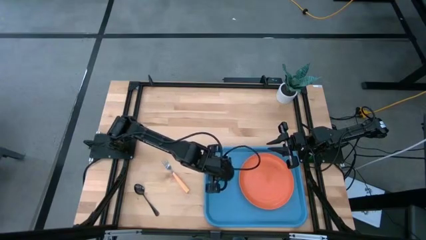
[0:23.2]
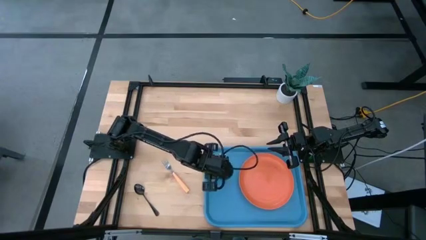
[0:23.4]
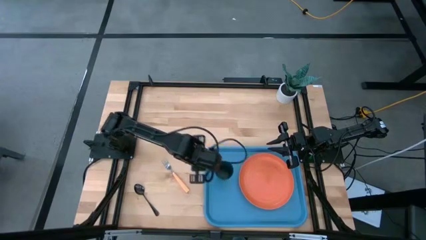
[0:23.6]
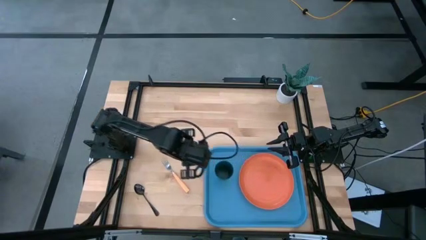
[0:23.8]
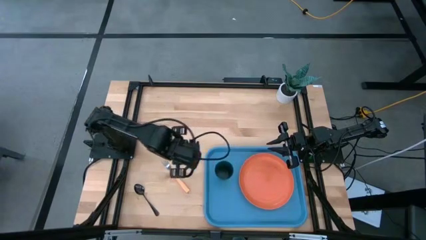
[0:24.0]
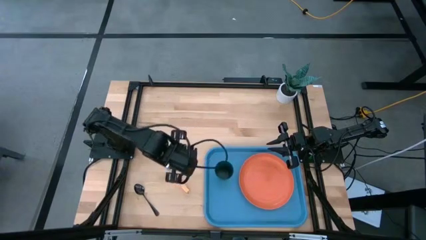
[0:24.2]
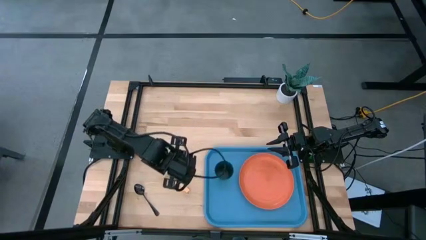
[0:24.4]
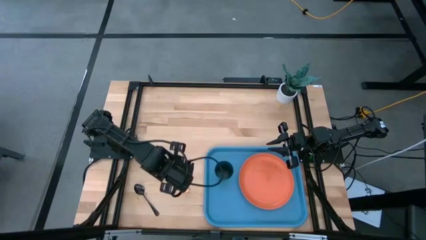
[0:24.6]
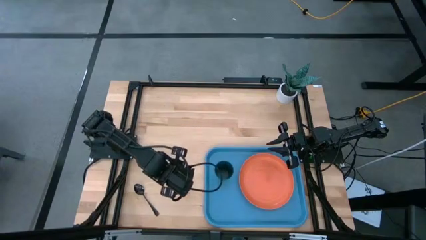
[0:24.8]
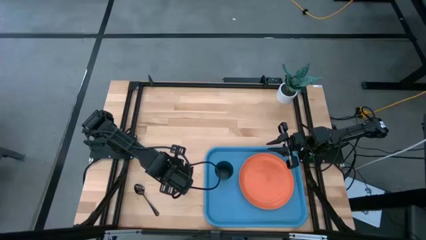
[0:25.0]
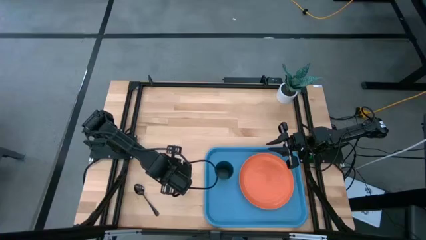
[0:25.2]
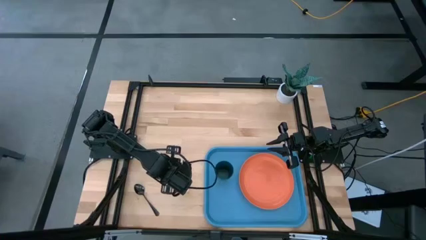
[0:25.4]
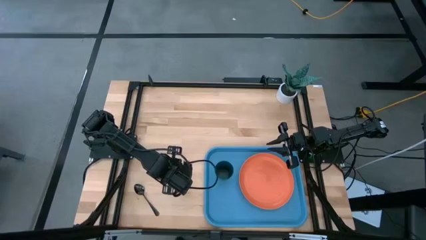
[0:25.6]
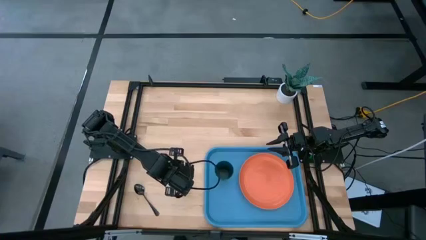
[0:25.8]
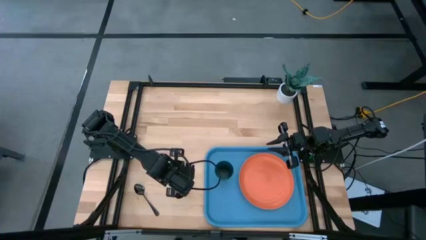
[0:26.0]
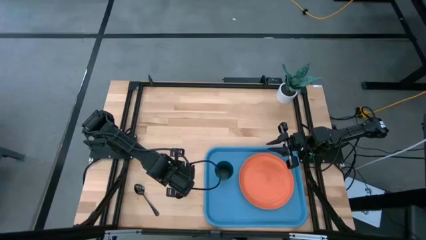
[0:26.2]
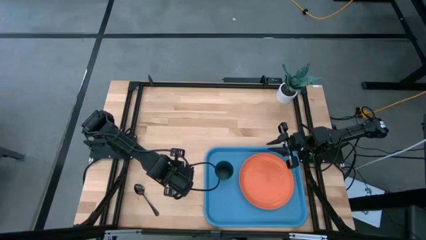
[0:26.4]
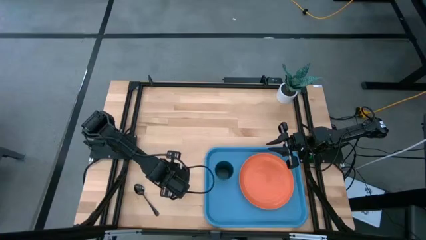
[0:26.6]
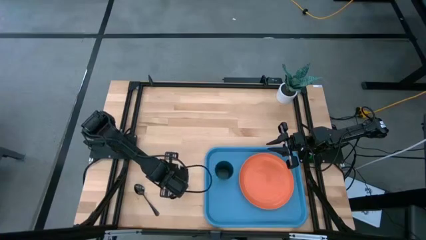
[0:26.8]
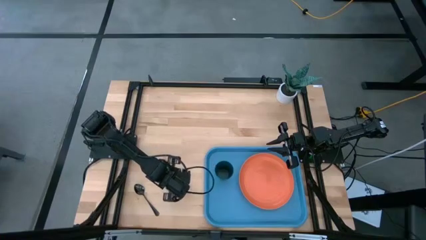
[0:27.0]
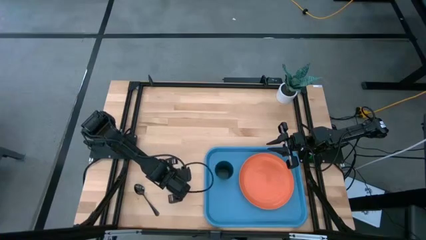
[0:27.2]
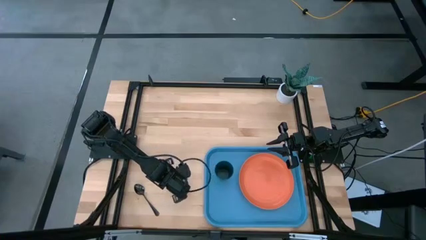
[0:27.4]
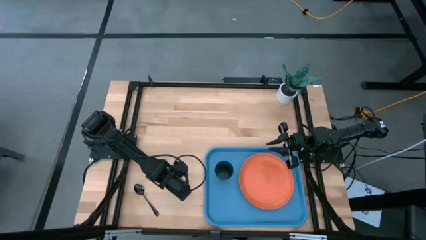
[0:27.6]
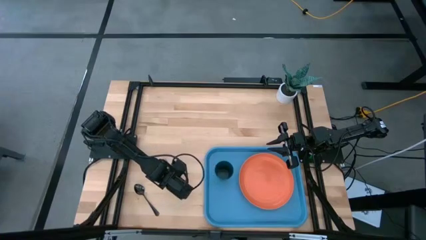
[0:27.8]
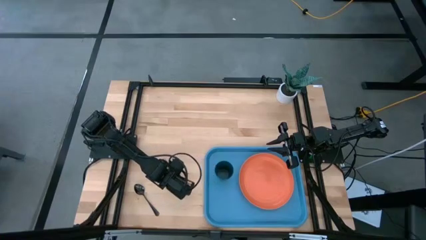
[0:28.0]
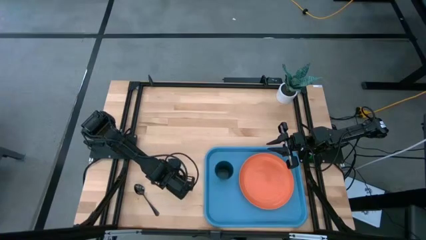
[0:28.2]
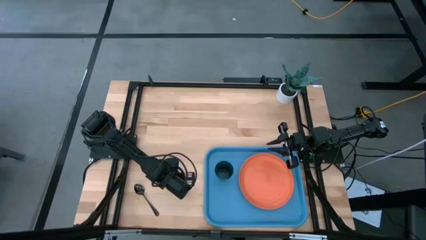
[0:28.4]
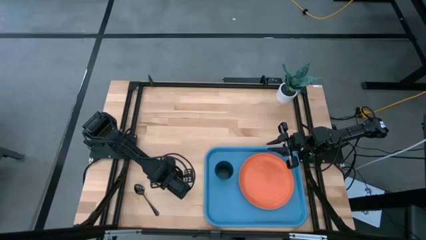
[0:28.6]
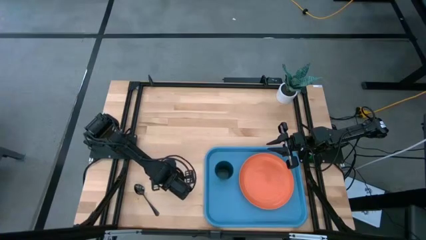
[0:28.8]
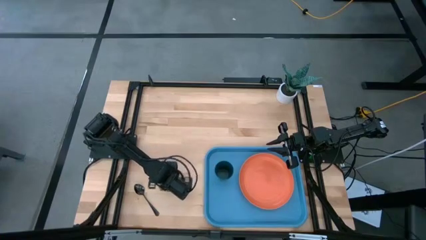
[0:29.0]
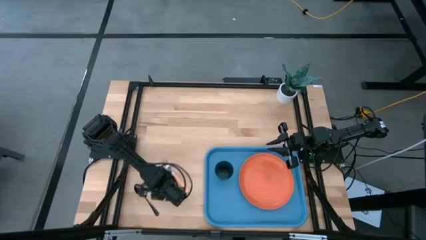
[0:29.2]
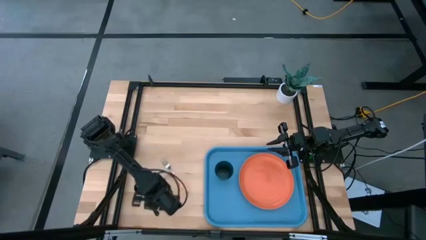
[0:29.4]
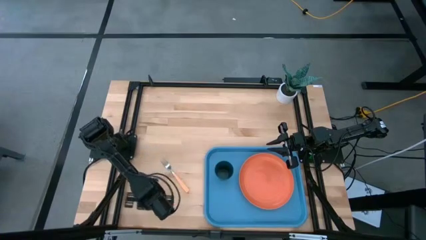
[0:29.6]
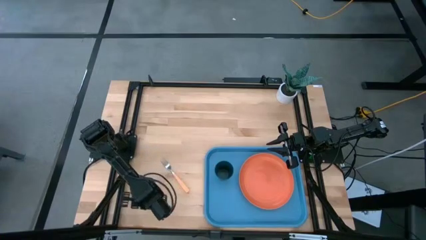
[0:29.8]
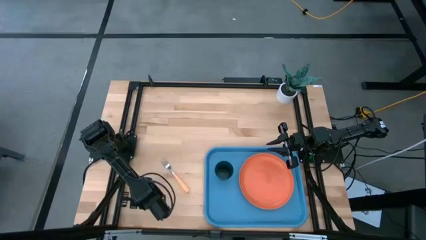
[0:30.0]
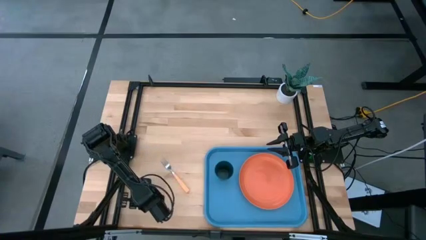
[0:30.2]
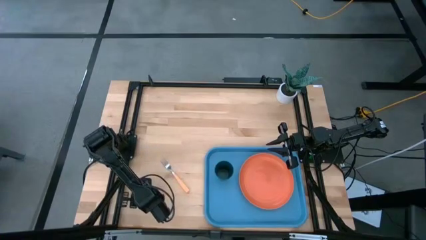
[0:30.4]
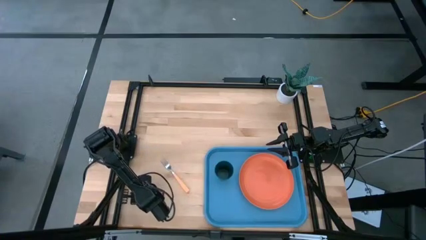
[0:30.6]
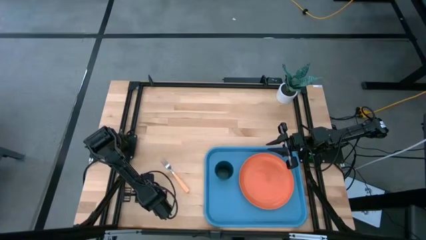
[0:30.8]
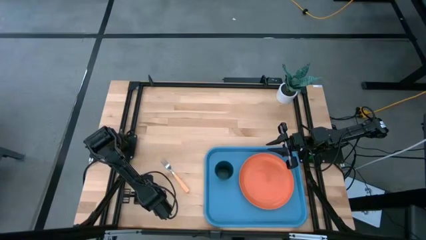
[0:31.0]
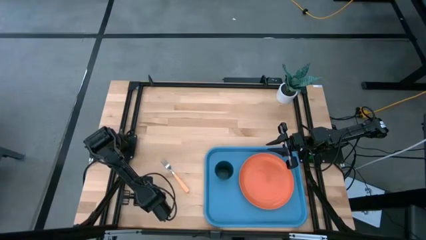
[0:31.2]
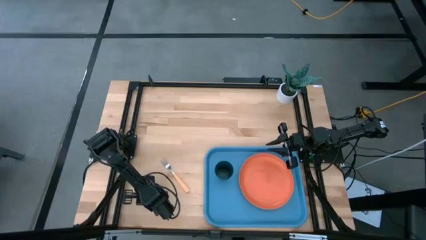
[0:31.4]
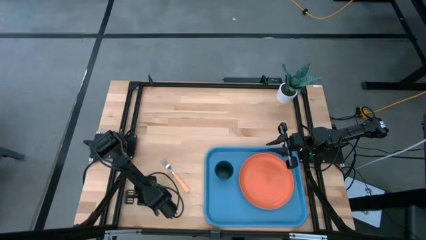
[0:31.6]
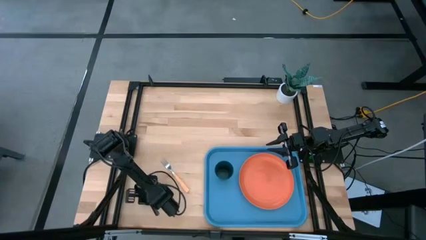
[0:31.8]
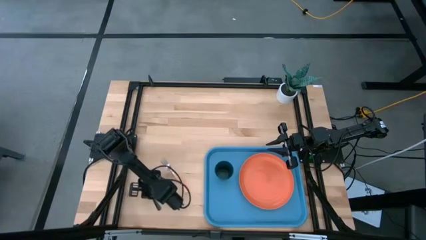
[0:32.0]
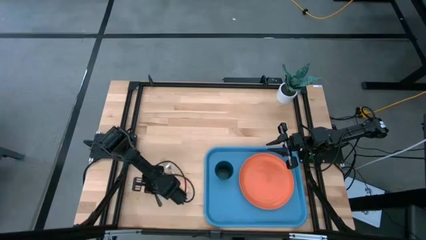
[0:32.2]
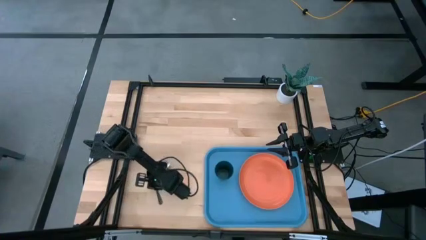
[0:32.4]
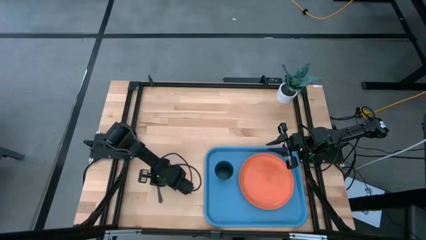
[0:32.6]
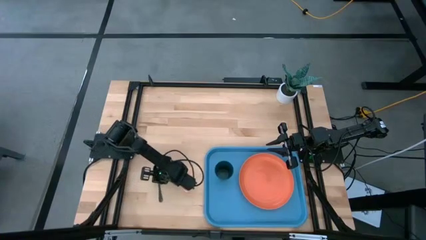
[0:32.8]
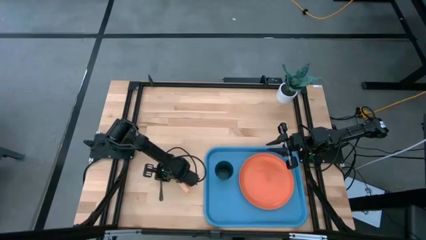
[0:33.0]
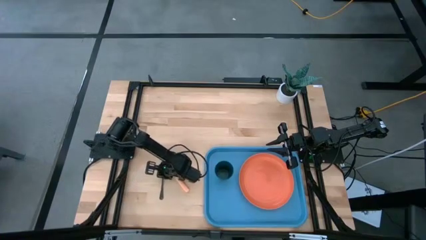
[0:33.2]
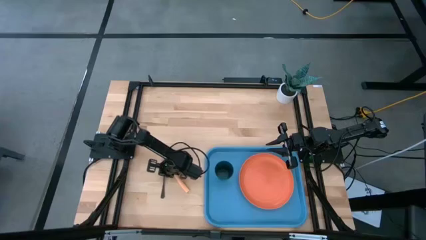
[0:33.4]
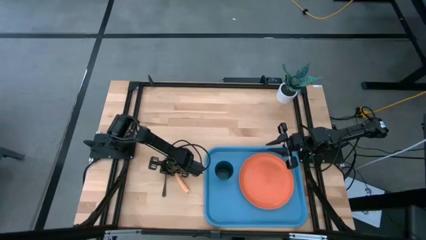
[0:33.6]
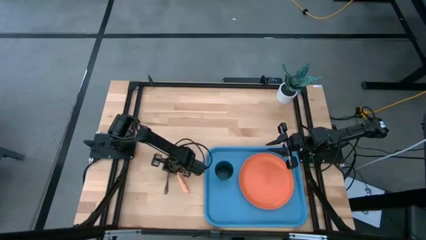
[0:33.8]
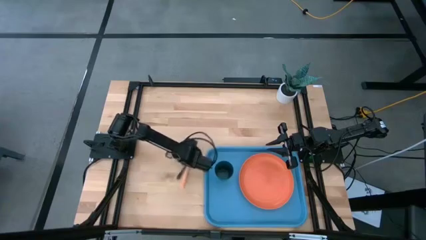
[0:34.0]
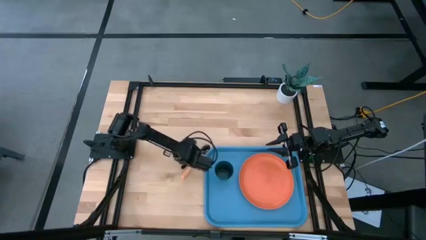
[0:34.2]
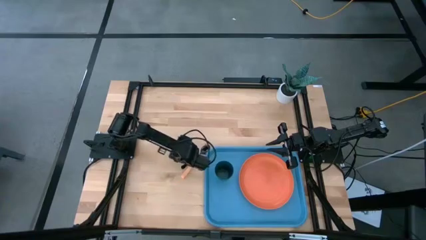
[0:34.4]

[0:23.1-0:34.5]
Task: Pick and place plate/cup/fork/spoon on tray
Adjust the black spoon

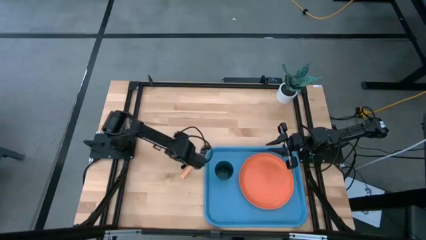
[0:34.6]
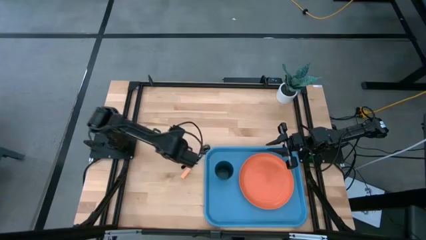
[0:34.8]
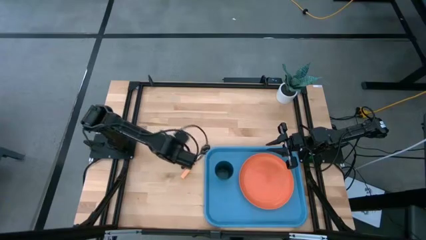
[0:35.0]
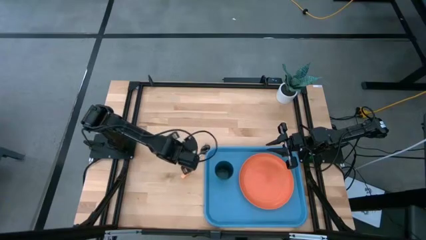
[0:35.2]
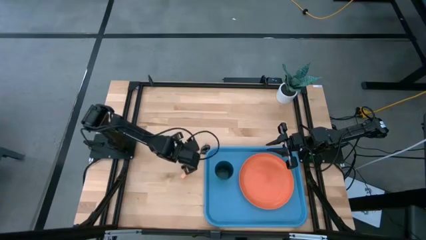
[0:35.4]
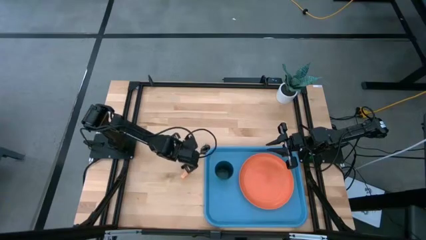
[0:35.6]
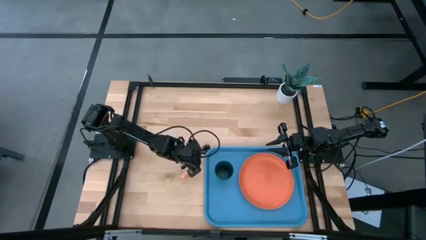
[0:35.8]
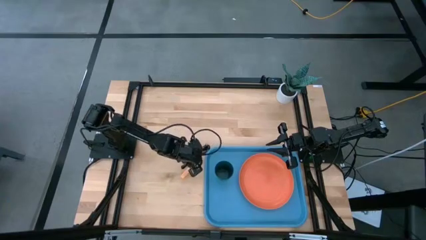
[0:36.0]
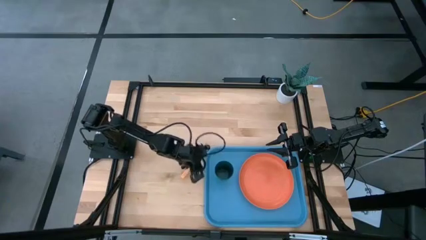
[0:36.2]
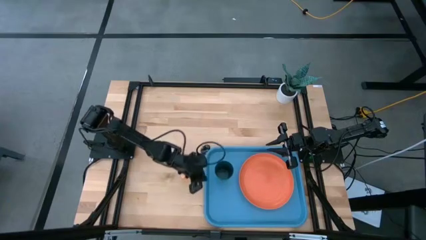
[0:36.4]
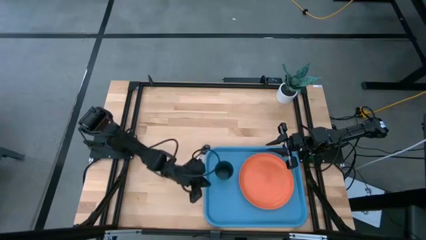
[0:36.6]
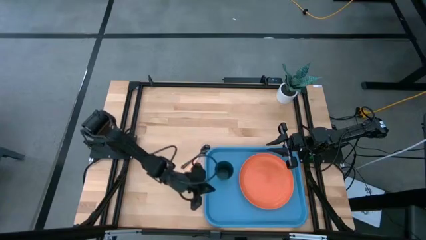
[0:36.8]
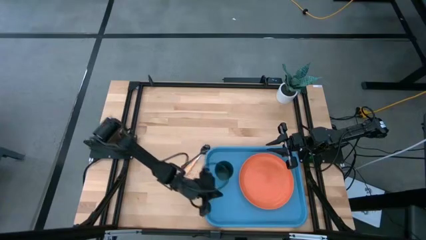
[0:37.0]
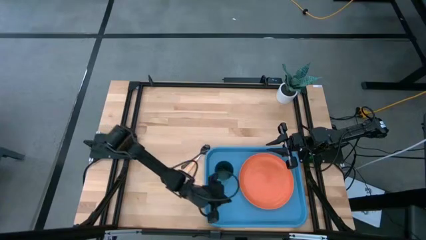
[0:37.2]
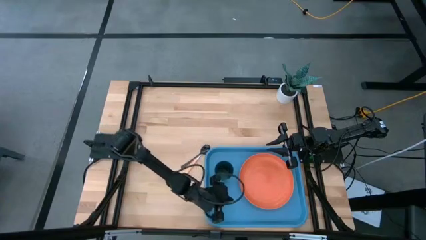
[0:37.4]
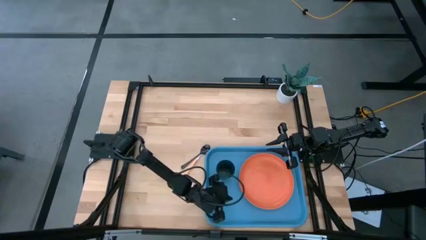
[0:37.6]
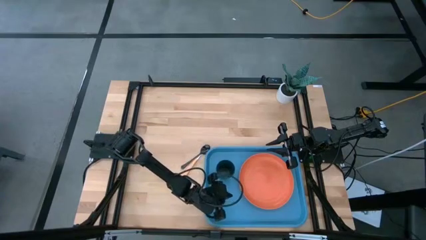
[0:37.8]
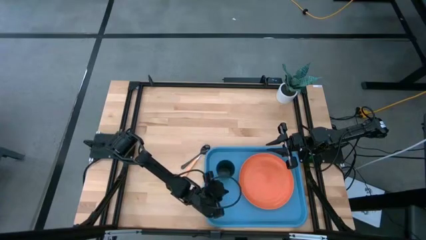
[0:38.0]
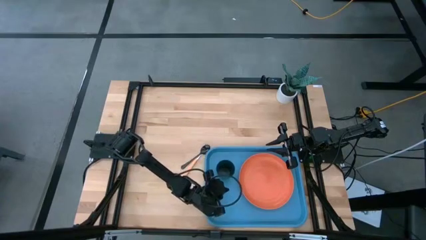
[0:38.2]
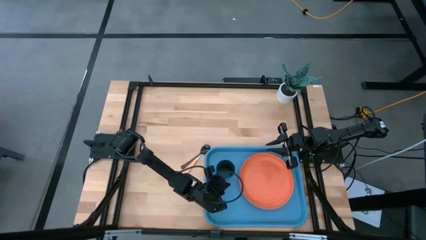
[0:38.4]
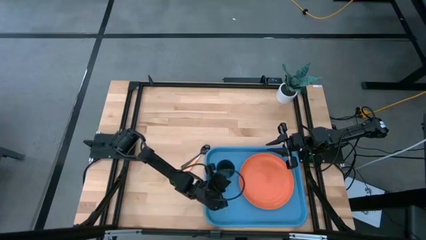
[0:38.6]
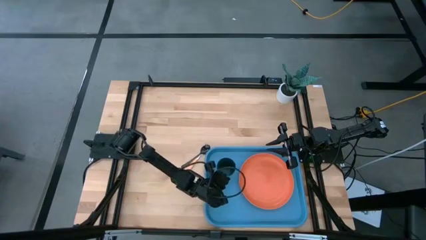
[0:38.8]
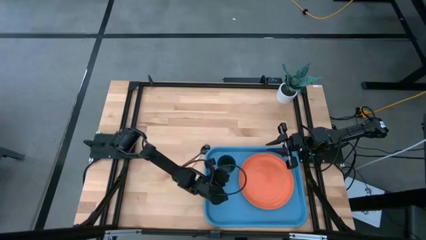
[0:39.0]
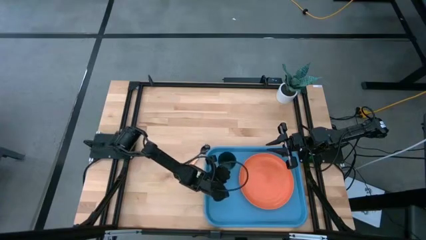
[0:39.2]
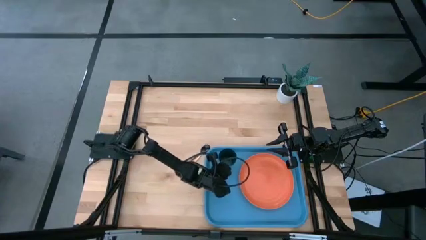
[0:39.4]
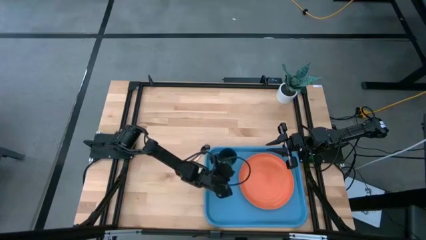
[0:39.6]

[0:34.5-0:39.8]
Adjust the green cup
